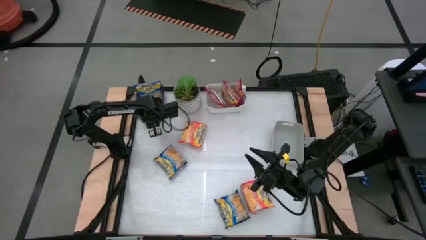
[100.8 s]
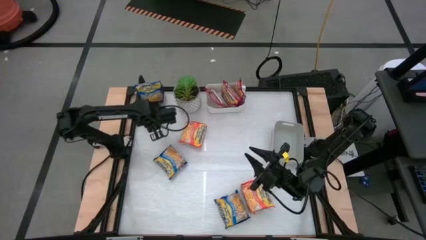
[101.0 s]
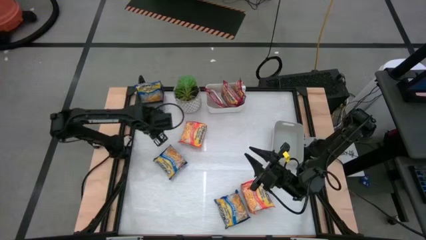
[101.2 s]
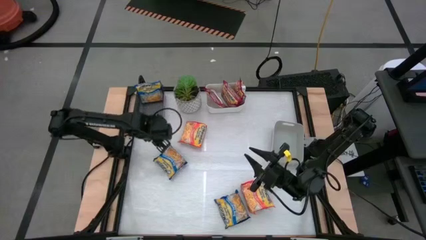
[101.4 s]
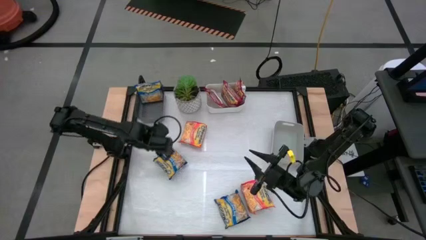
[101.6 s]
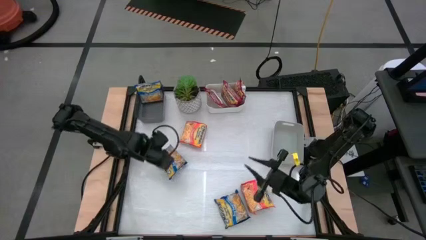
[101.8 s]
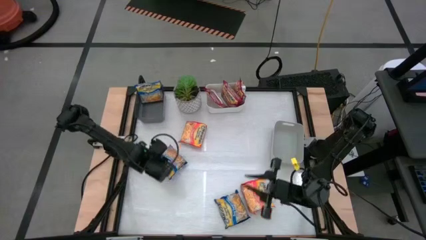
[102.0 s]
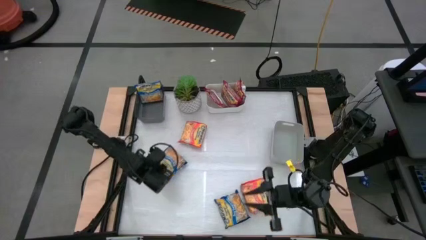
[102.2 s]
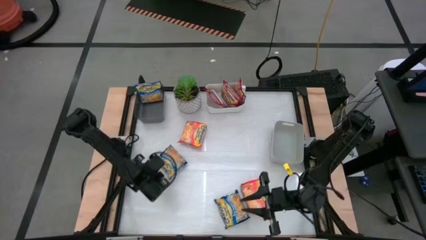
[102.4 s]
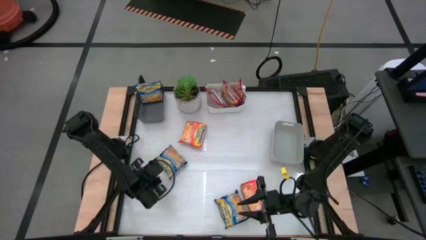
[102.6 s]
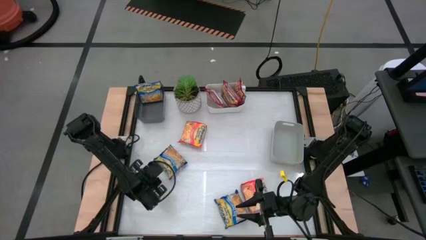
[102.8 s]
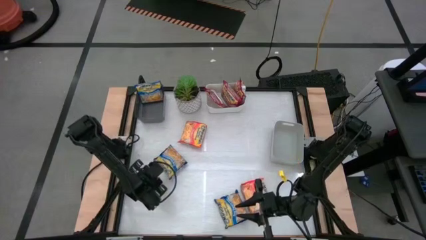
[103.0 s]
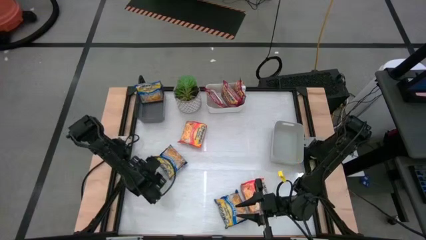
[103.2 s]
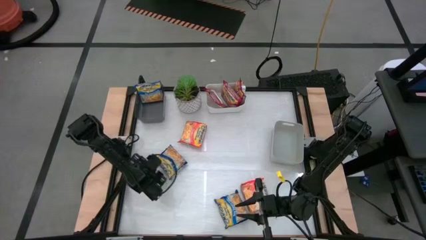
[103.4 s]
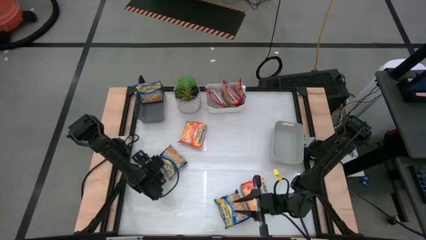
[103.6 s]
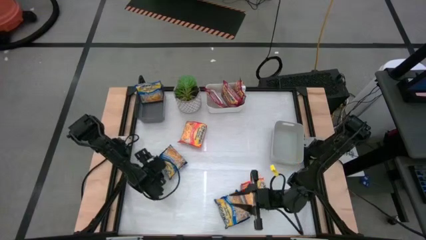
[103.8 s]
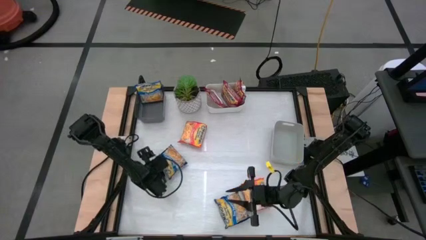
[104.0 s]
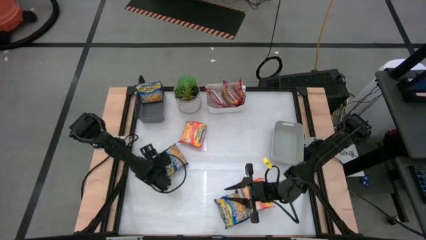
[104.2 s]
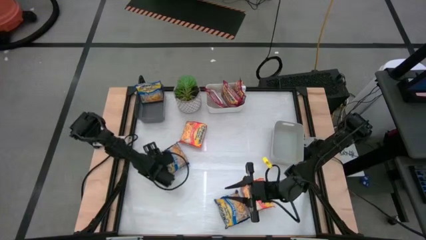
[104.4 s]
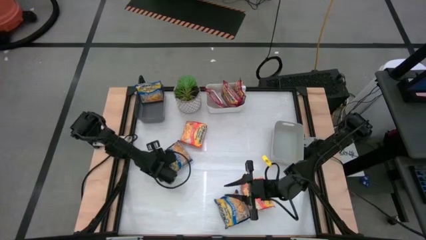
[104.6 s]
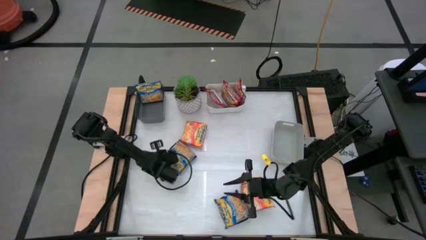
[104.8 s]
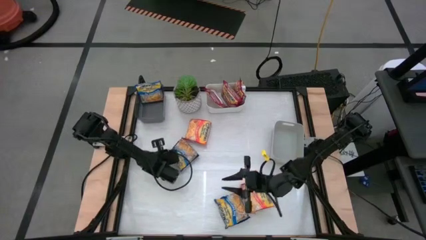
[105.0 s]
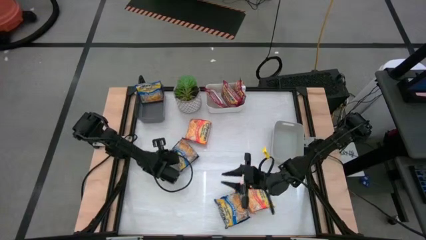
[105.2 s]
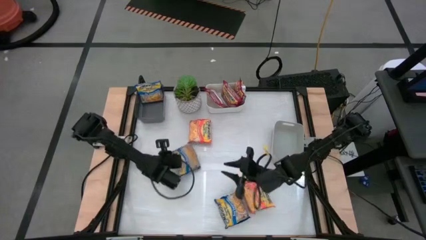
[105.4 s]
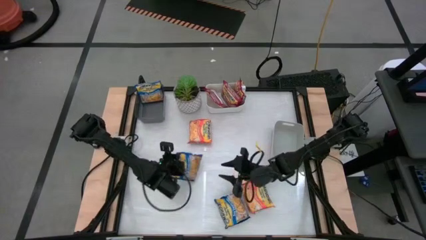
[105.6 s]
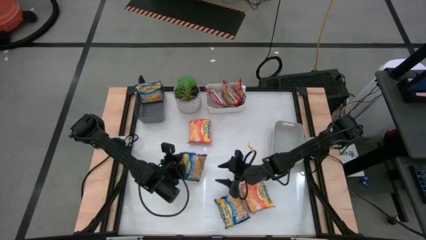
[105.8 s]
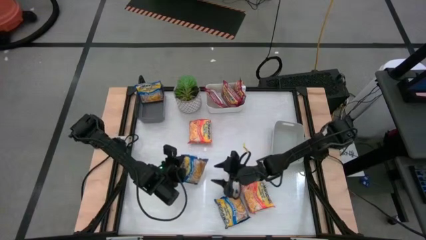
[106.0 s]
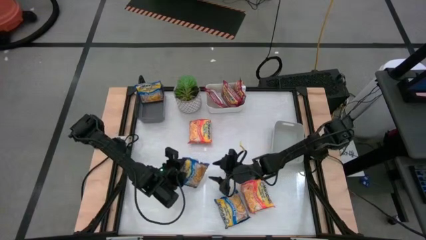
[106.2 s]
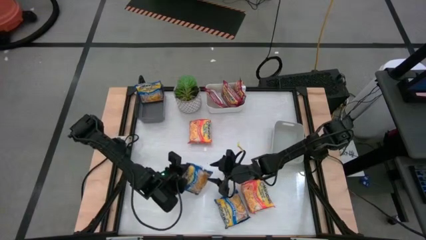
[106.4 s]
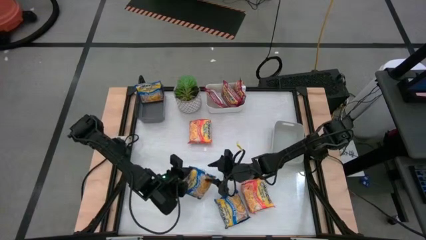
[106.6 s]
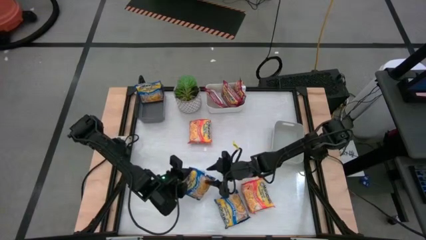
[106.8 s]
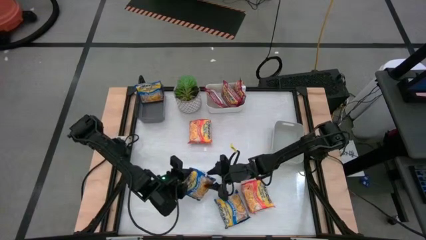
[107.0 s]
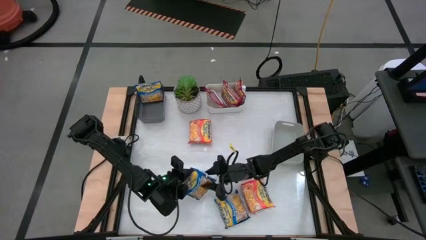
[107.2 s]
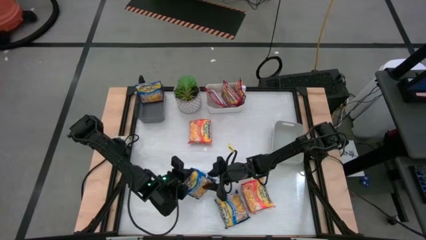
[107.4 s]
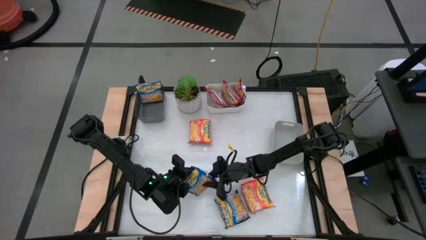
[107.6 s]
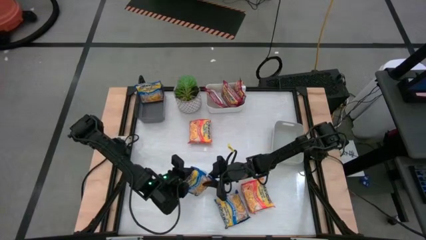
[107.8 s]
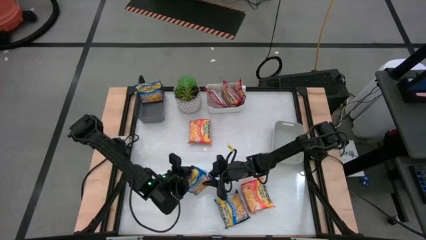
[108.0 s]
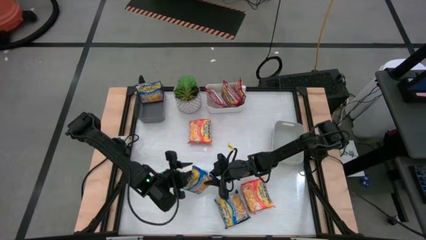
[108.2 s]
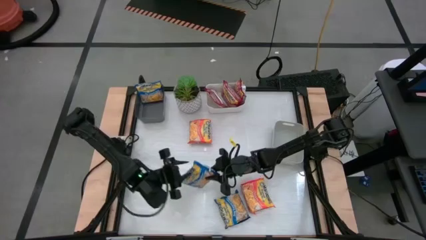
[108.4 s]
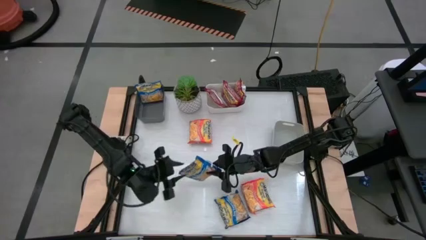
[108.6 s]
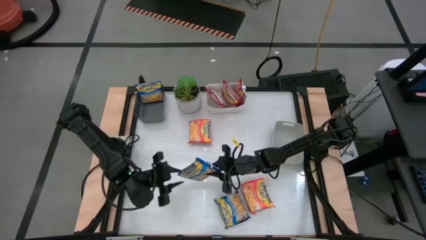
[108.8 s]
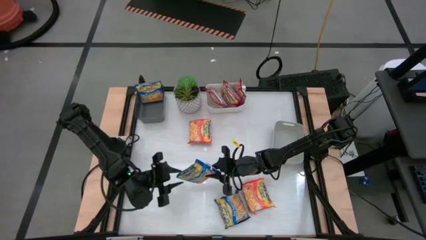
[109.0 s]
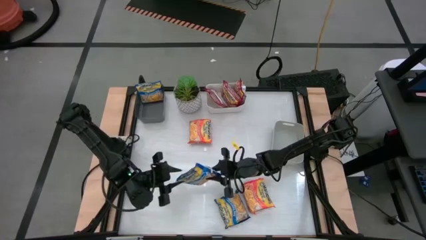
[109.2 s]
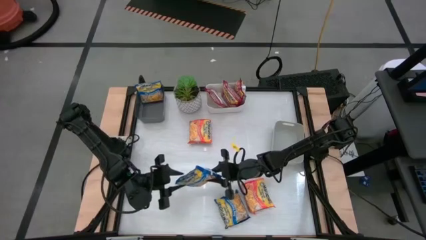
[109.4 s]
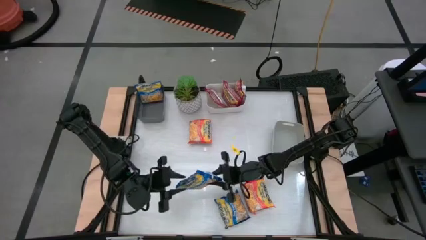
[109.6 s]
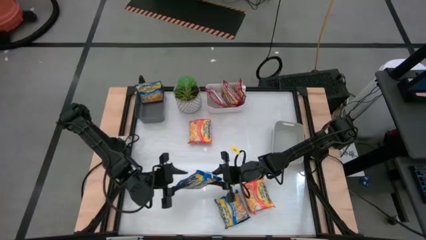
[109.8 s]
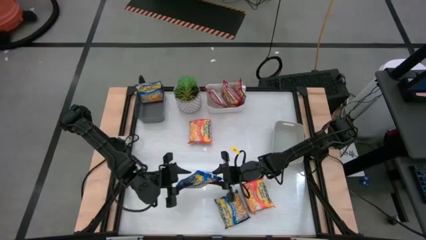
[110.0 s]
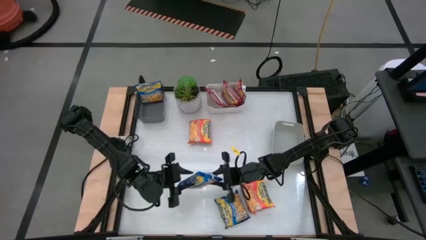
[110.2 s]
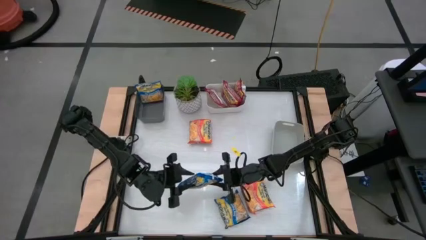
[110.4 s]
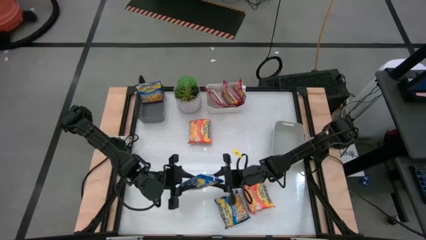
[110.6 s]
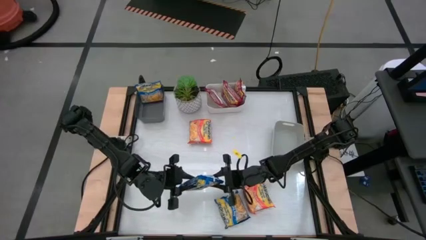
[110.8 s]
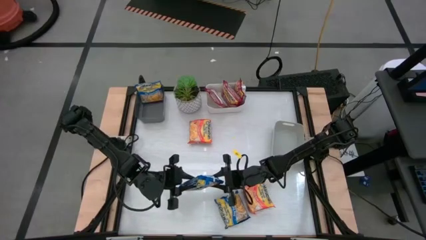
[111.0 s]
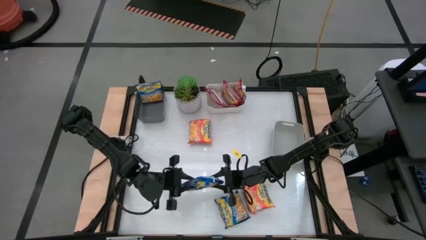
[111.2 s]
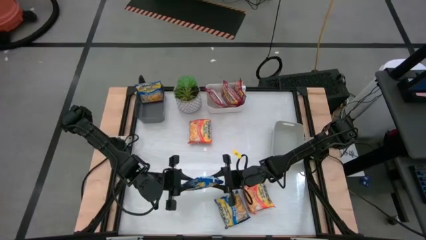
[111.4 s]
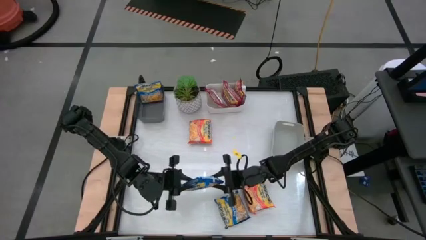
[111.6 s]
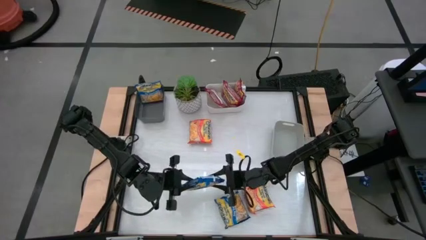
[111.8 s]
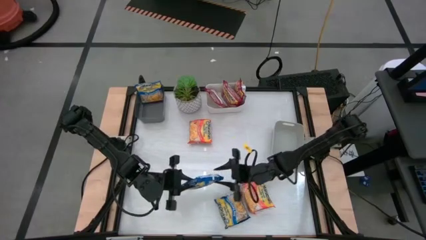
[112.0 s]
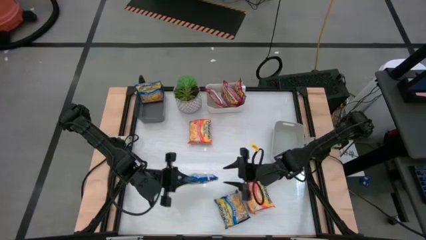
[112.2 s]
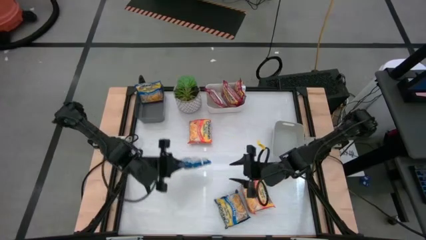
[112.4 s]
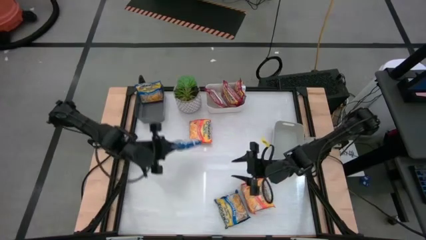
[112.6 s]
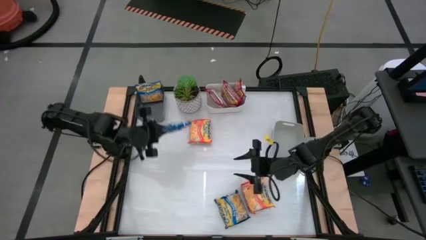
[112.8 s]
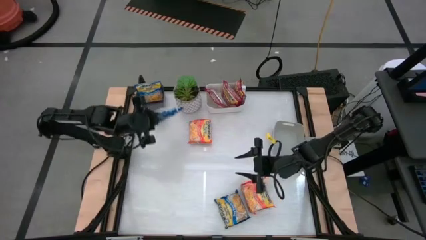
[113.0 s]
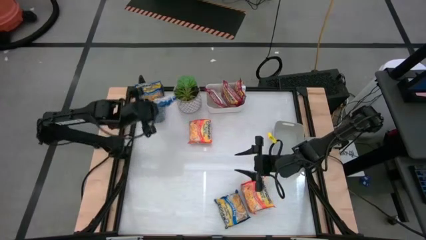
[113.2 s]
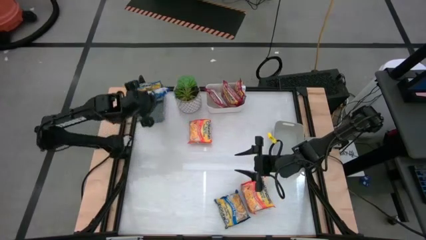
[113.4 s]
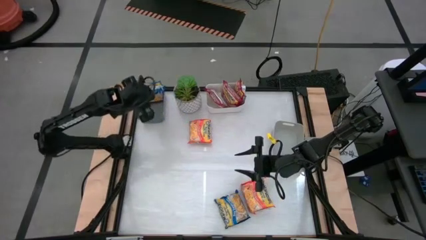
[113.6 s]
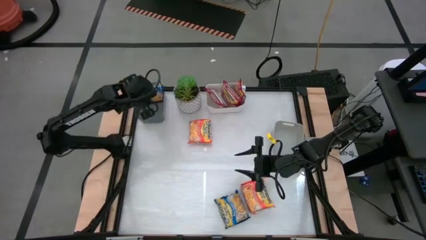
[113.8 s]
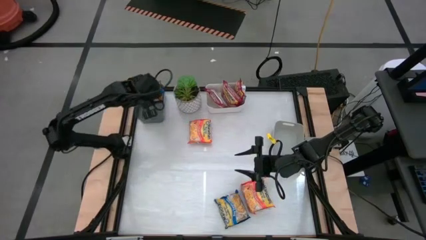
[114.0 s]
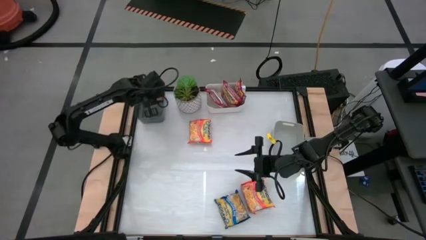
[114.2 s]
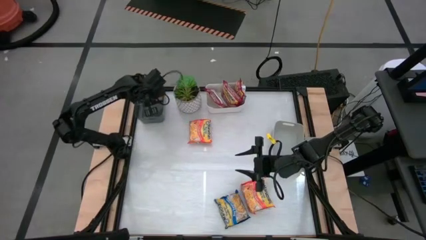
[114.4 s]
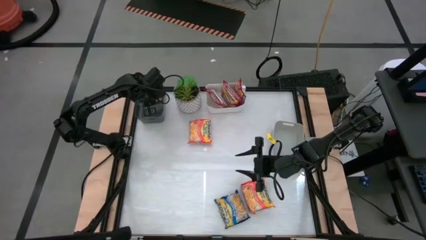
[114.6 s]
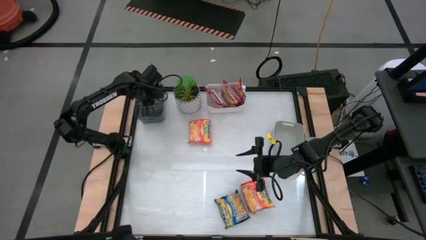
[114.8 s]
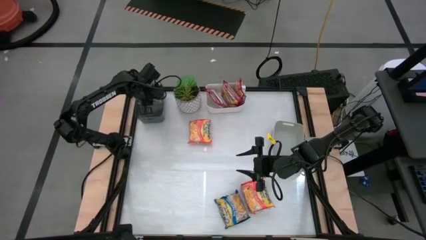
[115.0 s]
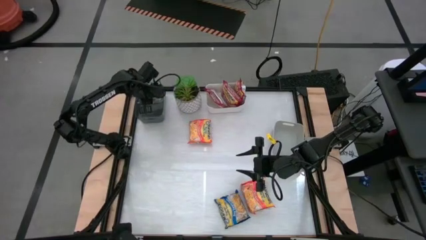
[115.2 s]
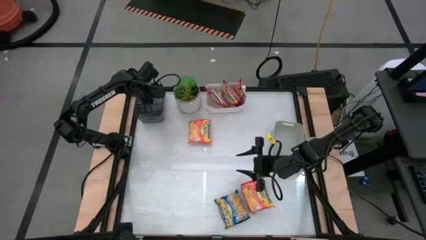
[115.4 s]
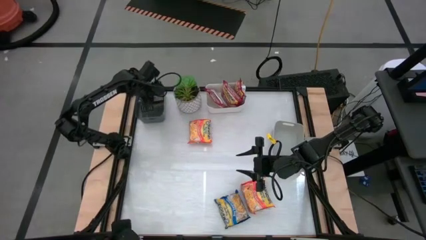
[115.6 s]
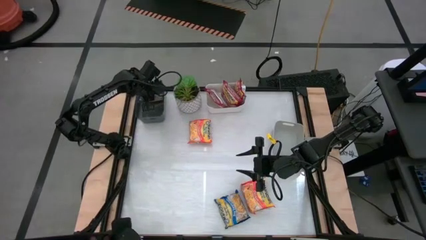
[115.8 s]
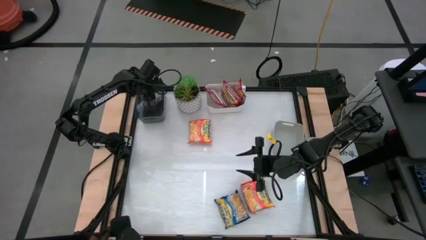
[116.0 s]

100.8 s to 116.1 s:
Task: Sort Maruchan noodles
Put the top blue noodle pack into the black bin

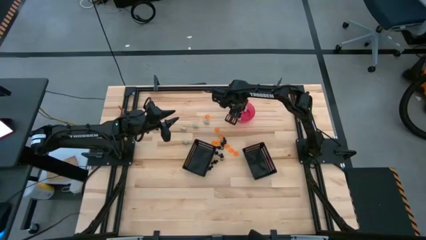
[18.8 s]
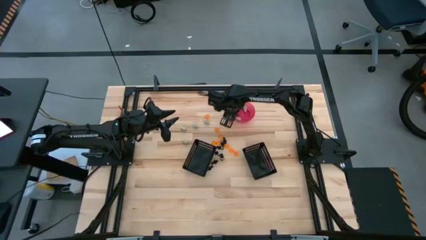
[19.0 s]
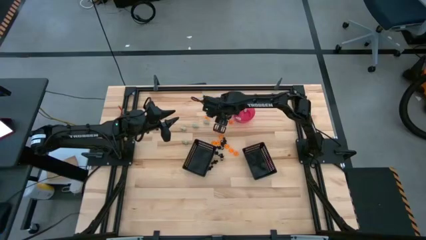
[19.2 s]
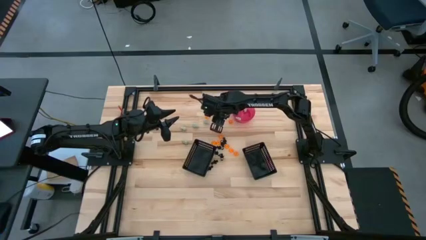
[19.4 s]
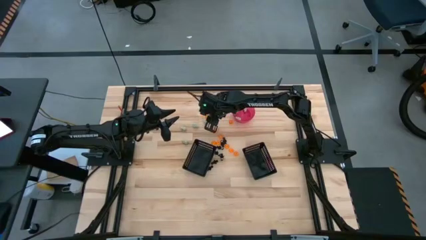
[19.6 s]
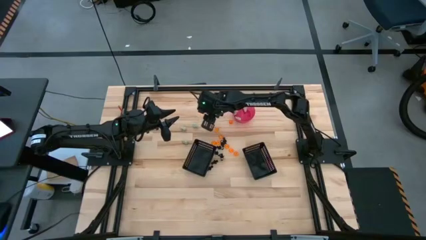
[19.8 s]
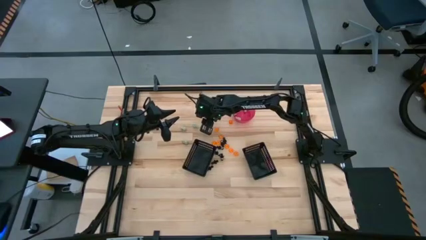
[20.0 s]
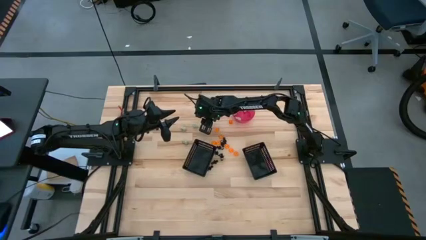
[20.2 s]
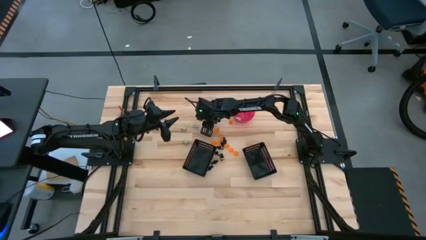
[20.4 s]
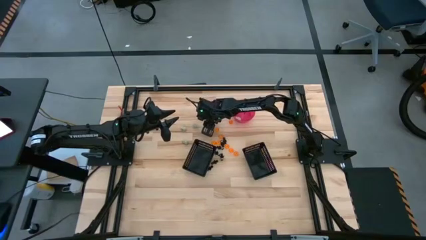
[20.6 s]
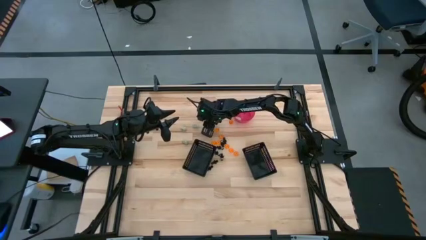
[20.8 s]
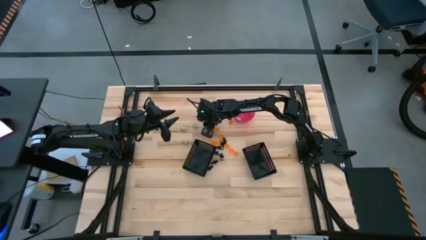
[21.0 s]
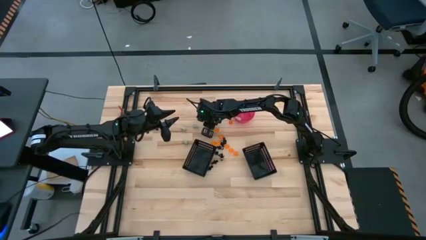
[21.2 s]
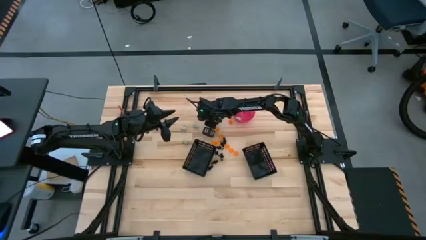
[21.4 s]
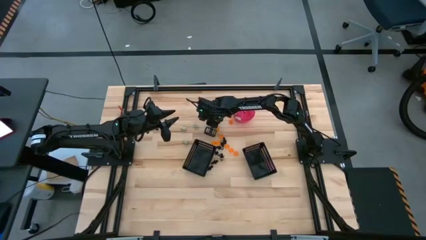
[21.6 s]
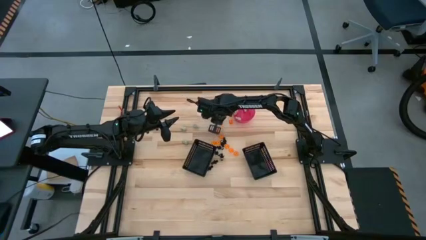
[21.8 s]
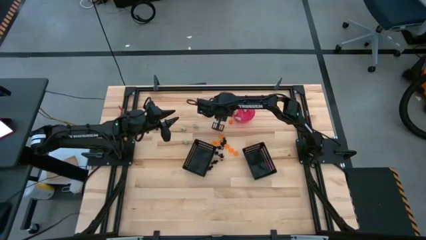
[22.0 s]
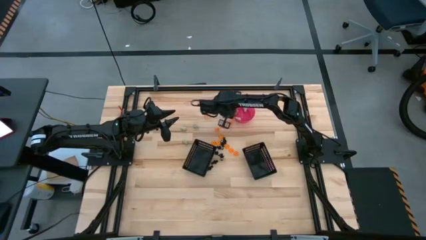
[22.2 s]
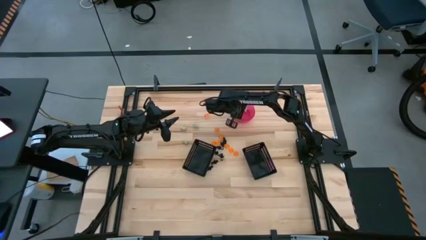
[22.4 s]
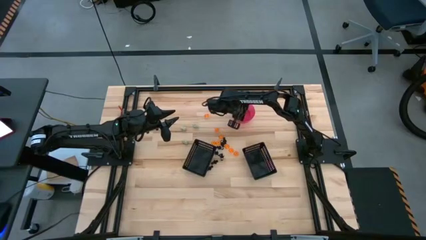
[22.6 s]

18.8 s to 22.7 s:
Task: Sort Halloween decoration
Put the white skull toy into the pink container
